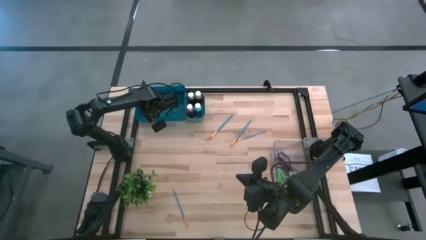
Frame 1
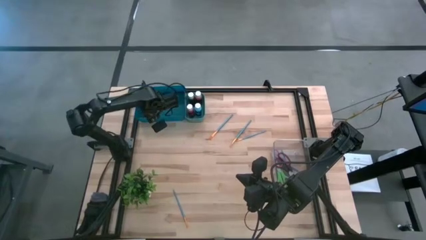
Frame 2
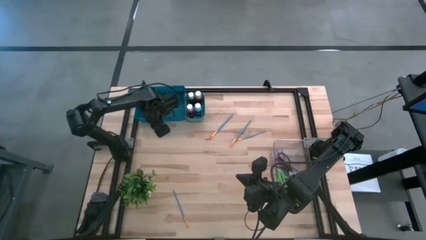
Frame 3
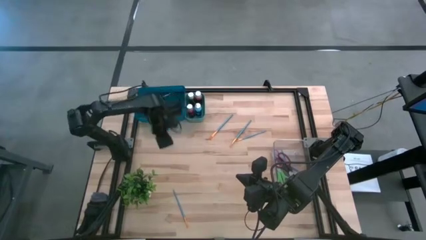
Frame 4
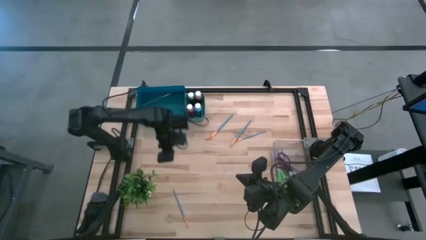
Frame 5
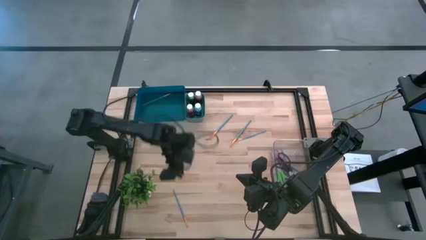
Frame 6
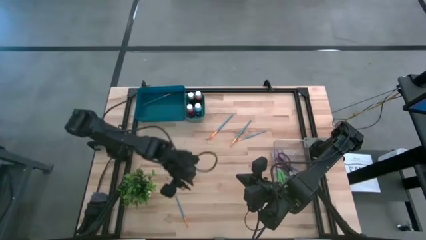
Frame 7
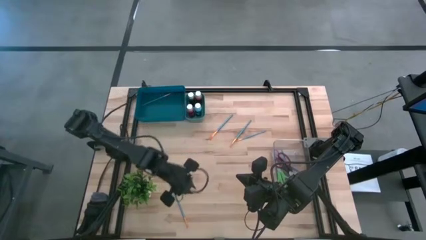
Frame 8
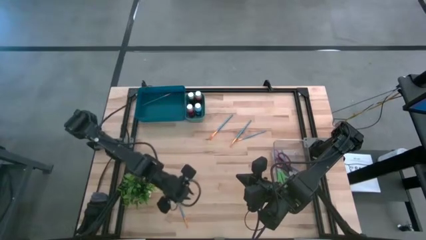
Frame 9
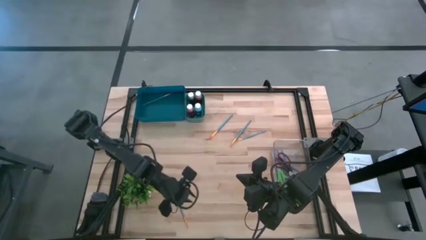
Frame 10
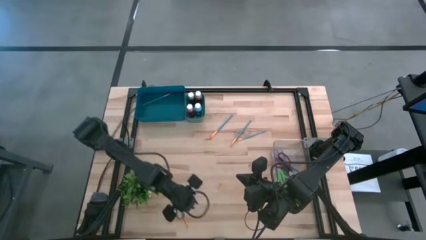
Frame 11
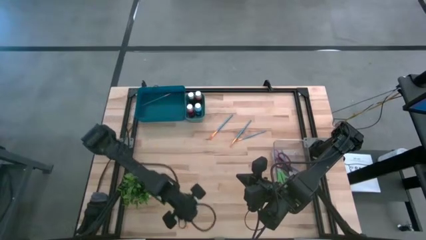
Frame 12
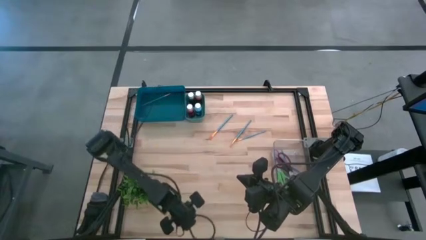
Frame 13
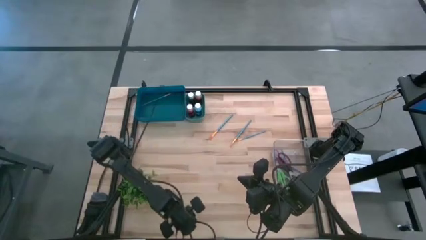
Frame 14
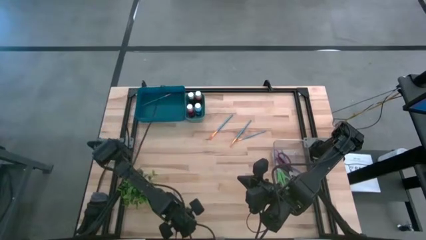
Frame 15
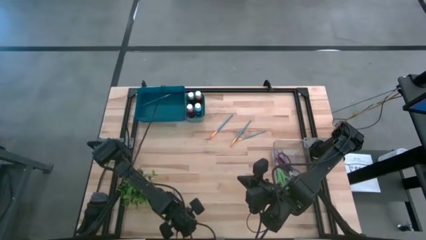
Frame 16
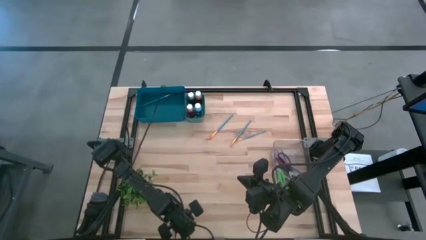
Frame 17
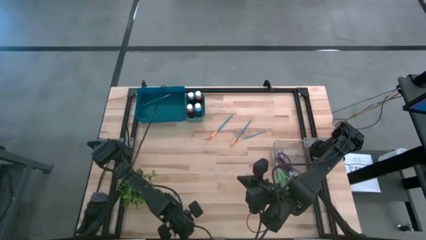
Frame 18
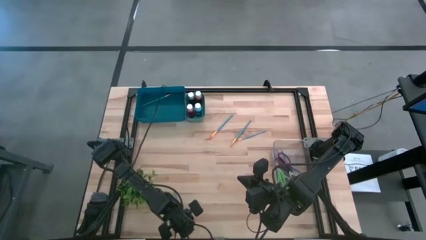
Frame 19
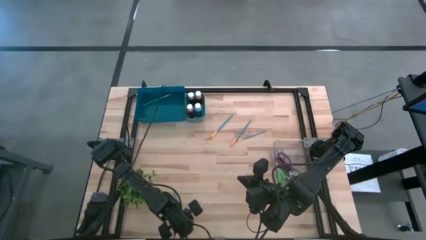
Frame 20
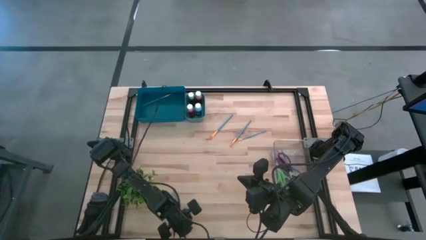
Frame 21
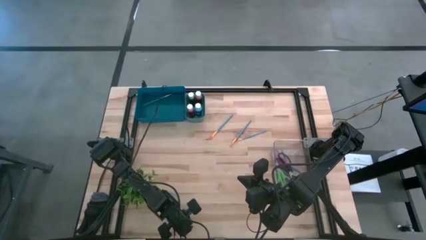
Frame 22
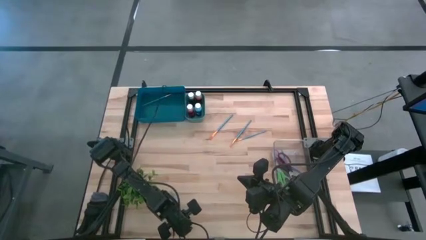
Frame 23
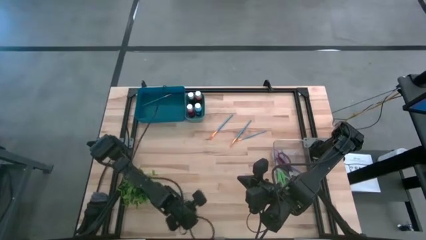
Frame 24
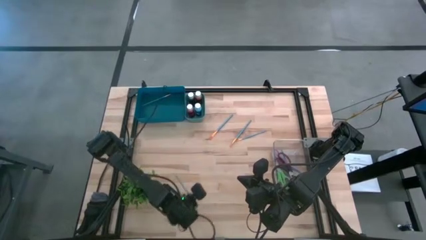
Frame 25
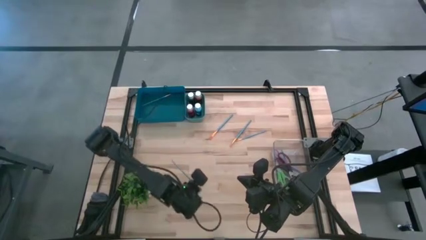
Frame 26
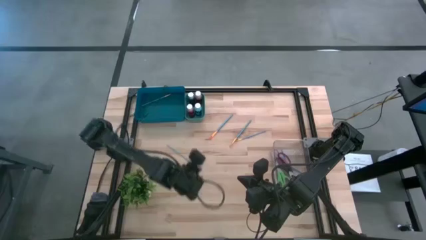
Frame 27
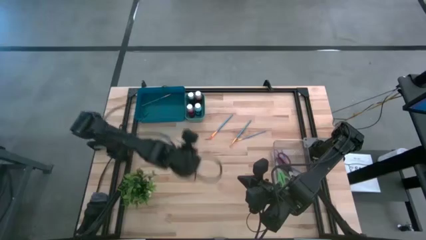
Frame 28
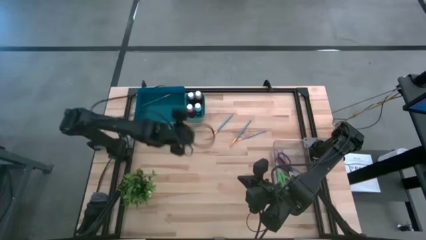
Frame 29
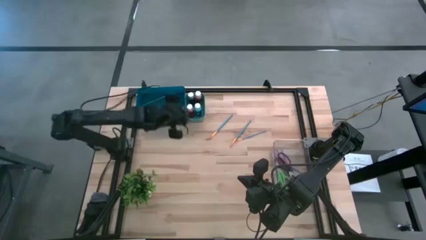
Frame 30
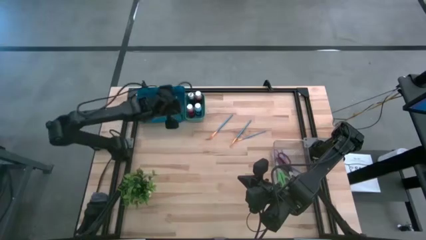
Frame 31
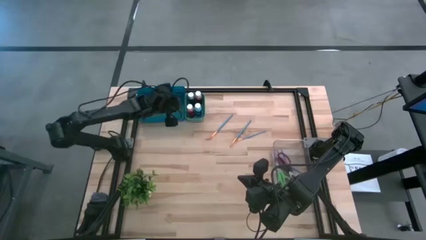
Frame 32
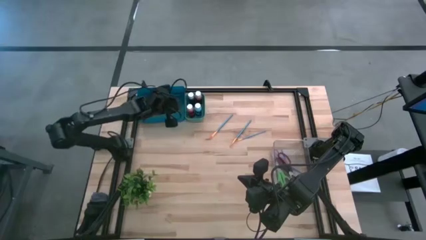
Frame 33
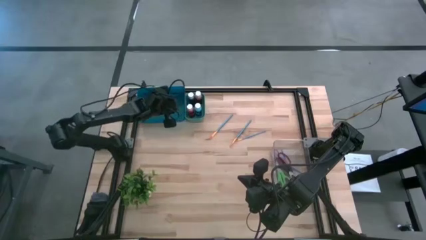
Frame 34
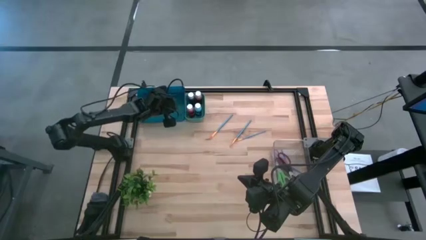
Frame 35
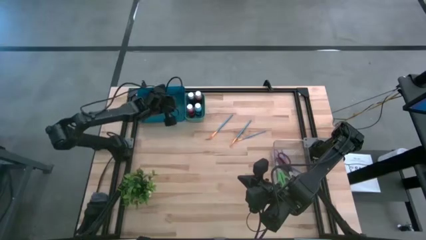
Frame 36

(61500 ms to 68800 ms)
Task: Pick & Place Paint Supplies
Put the blue paint brush into the blue bin

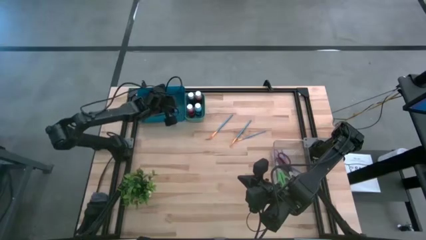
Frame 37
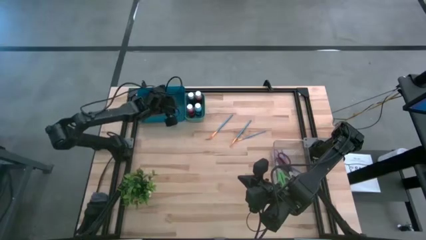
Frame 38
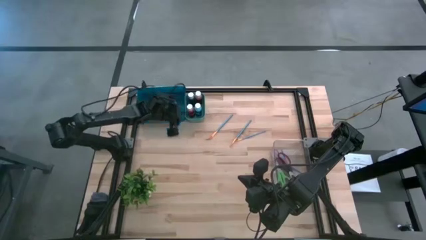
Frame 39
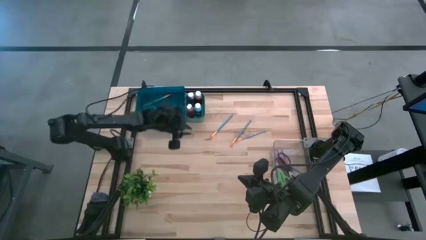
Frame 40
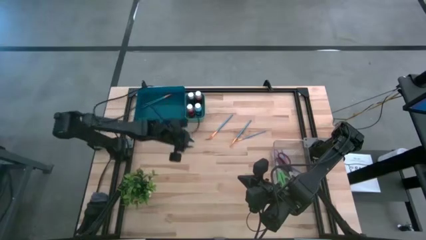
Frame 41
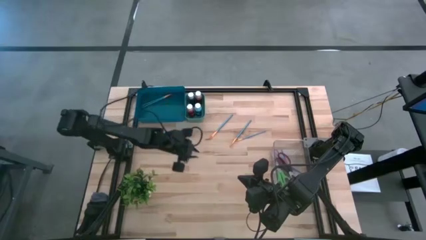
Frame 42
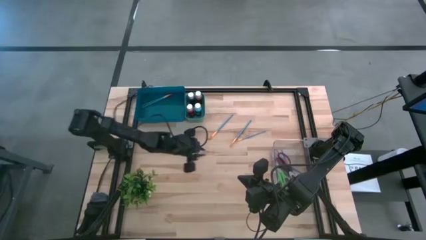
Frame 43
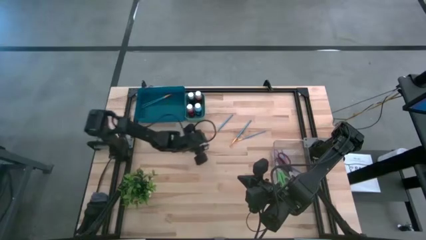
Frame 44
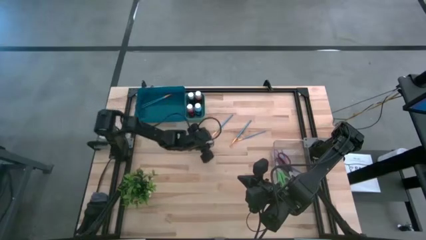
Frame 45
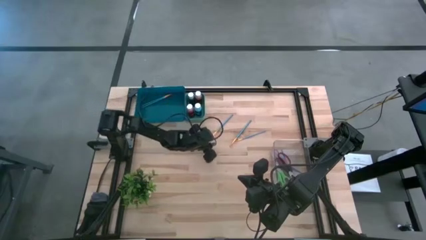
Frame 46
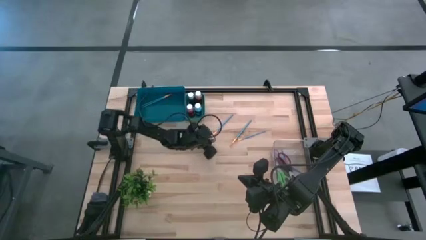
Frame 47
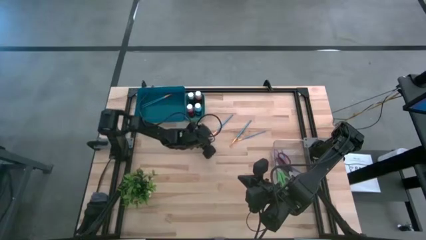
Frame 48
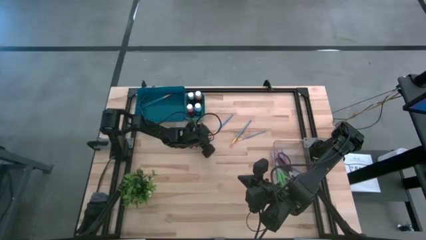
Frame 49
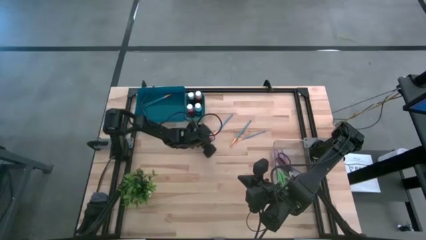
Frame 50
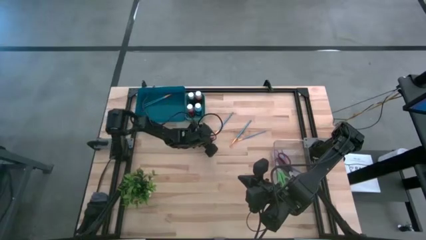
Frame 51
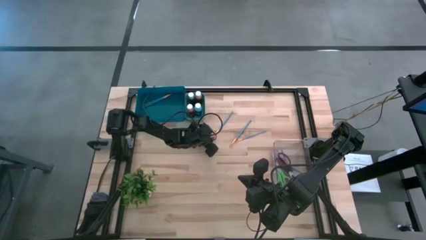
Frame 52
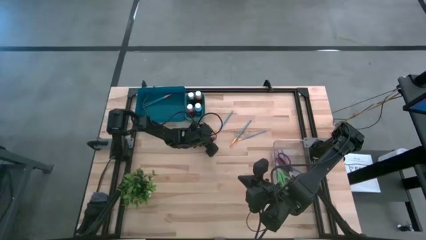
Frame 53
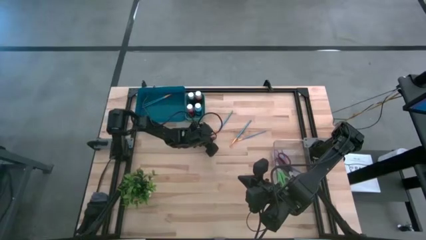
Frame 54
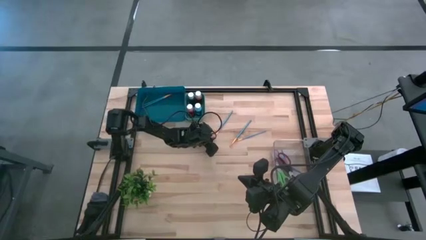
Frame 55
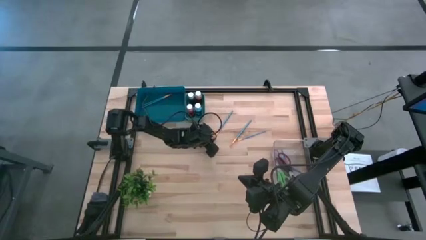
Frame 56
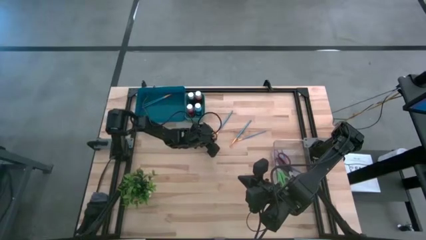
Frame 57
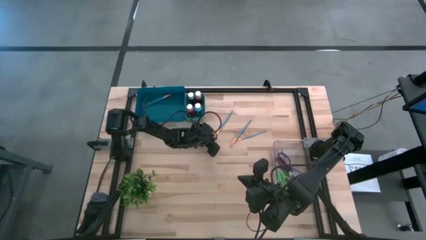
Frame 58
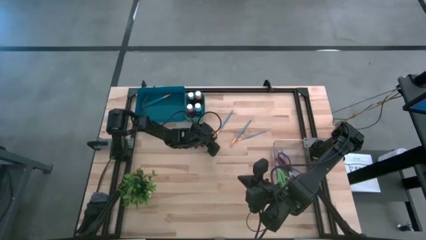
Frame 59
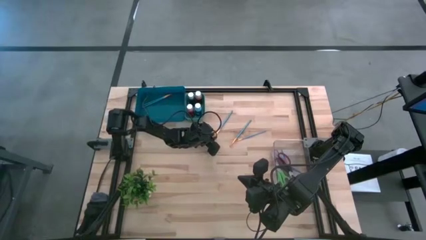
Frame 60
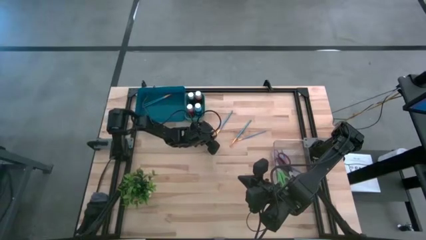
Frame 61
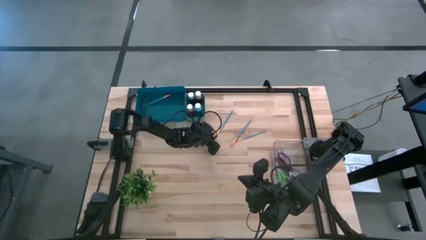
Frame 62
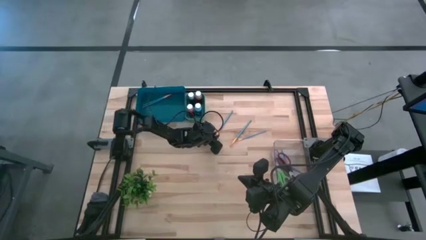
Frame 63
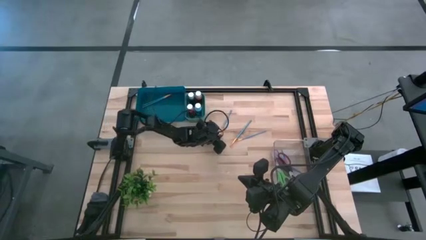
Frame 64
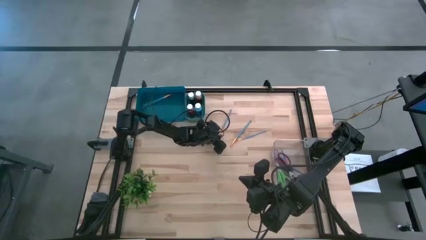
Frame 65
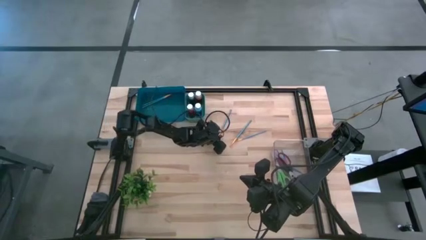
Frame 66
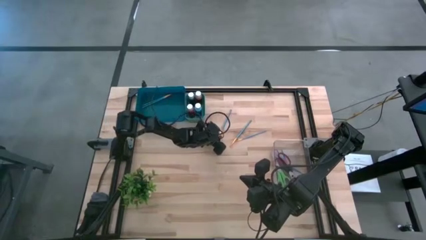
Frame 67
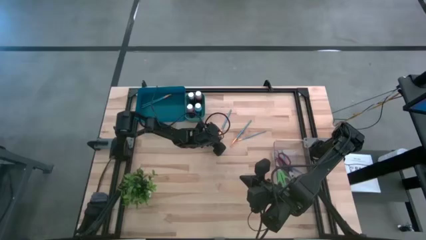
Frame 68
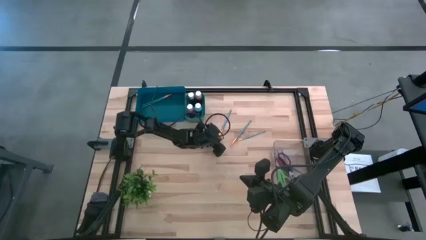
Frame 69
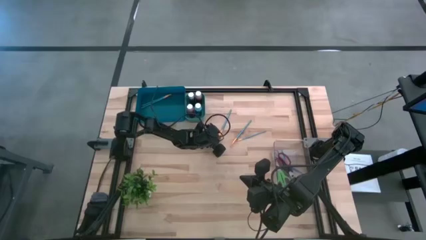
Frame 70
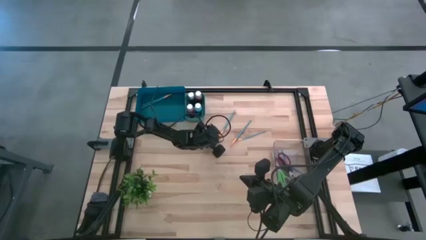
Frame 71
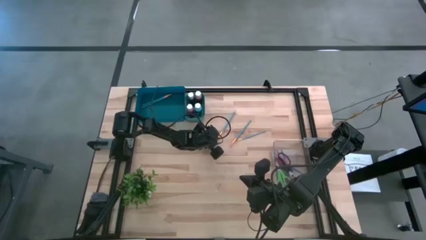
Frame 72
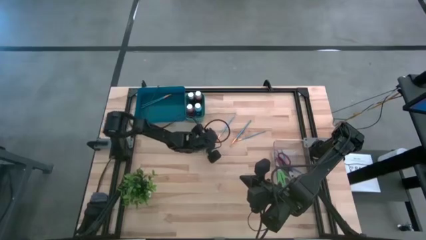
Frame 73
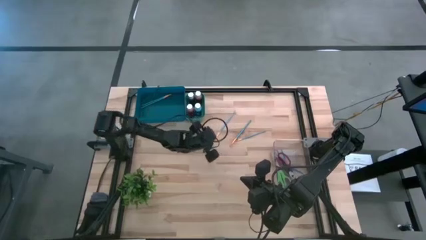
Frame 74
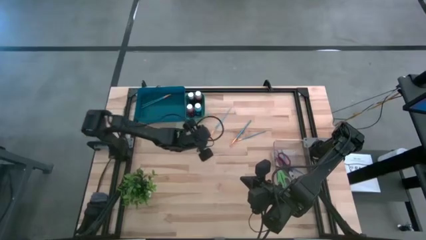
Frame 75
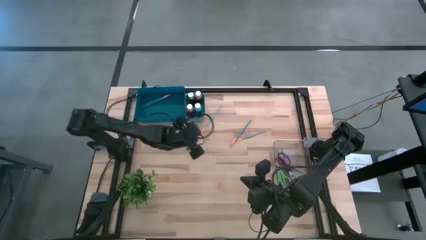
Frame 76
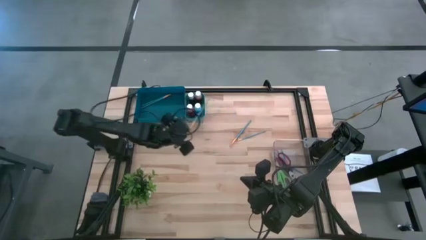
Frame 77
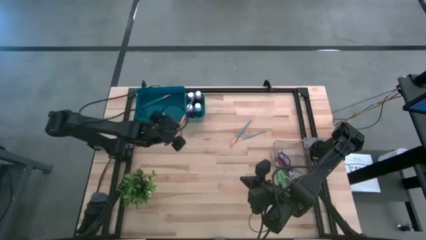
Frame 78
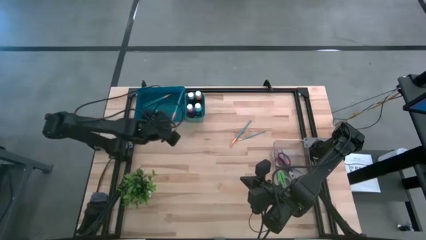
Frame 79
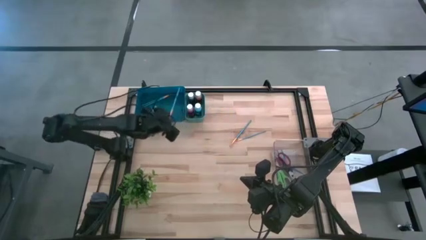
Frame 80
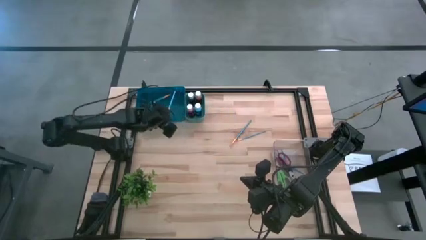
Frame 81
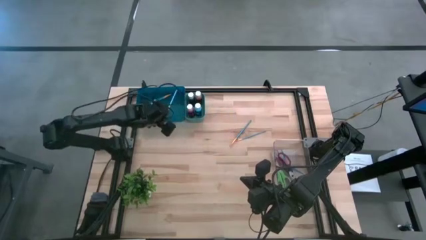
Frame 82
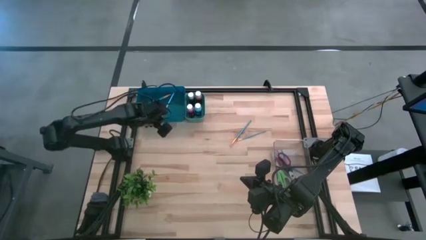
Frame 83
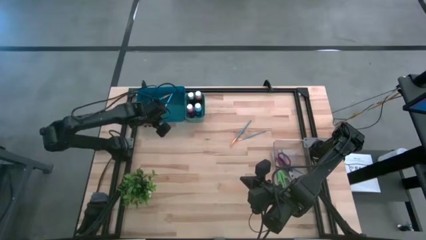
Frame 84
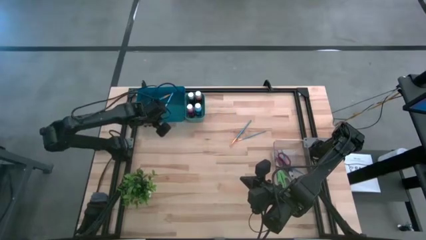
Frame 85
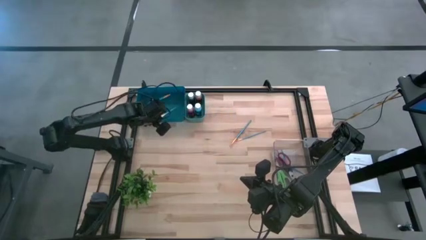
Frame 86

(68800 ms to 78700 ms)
Put the blue paint brush into the blue bin
